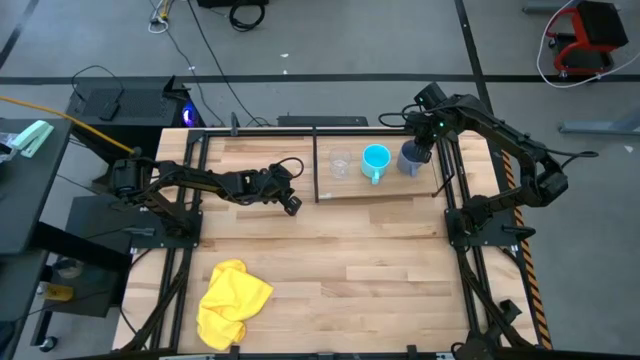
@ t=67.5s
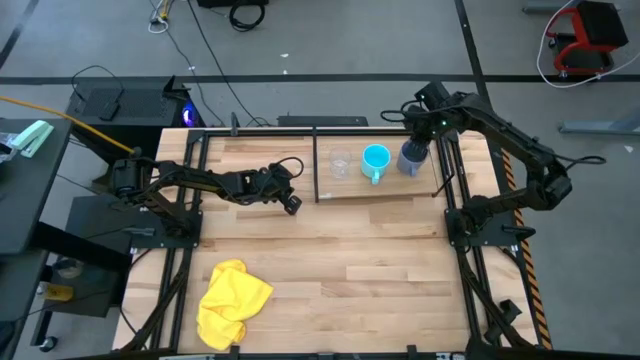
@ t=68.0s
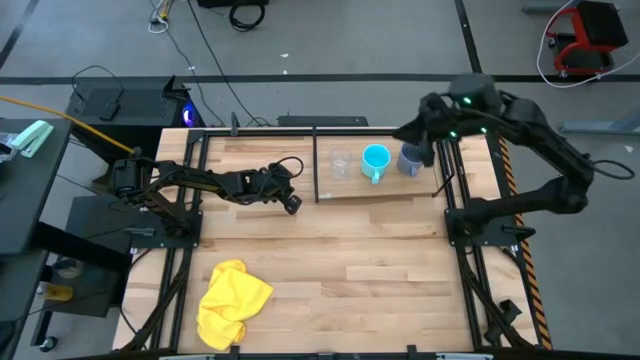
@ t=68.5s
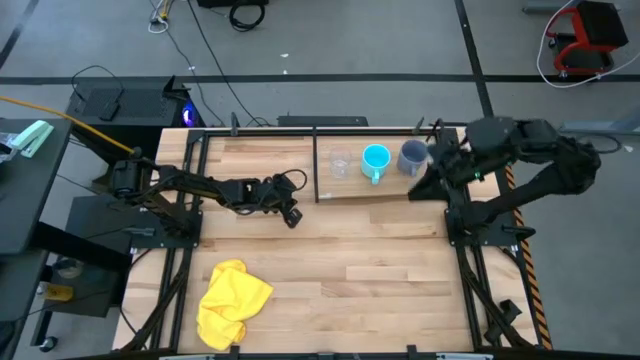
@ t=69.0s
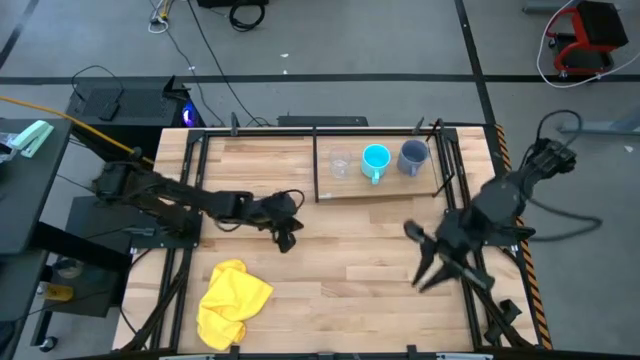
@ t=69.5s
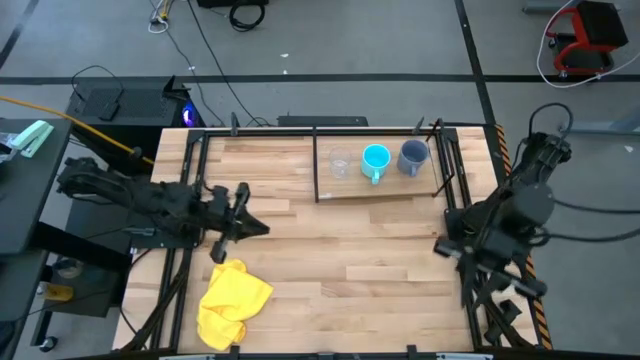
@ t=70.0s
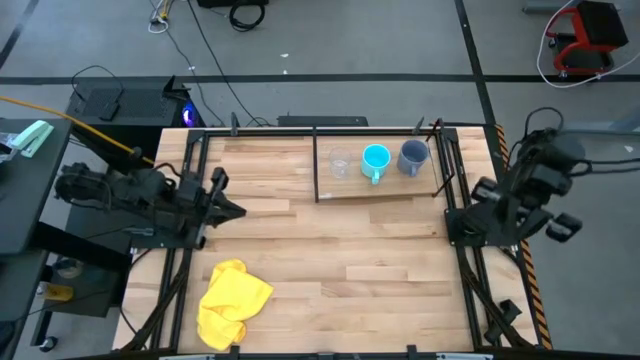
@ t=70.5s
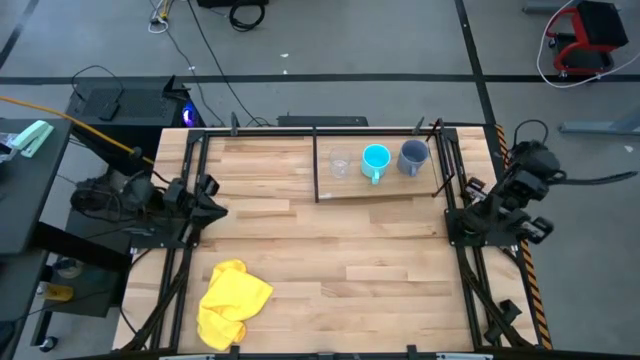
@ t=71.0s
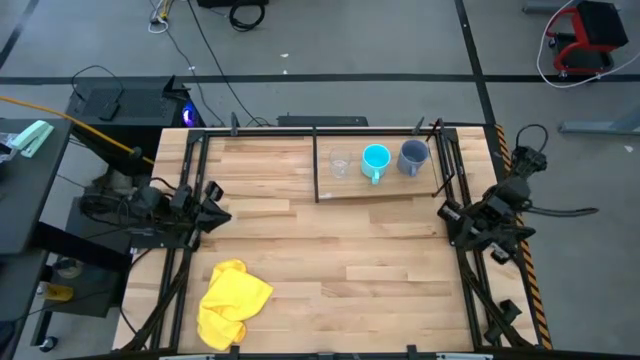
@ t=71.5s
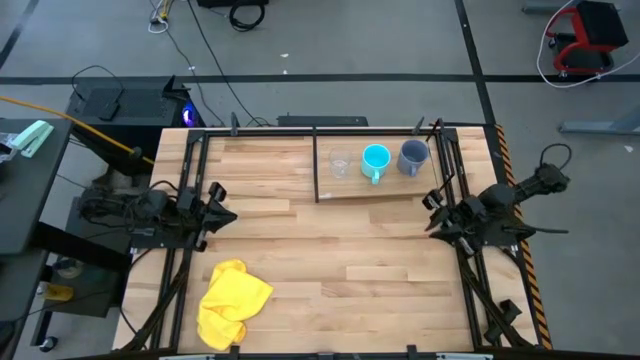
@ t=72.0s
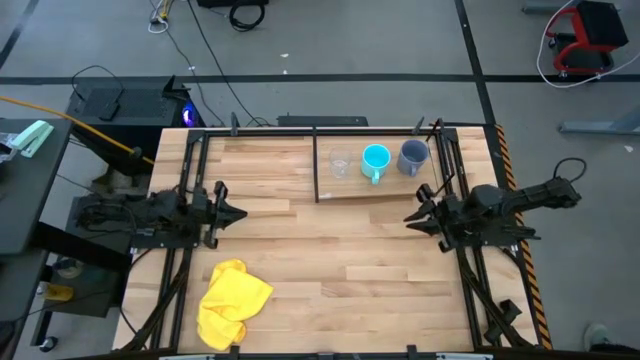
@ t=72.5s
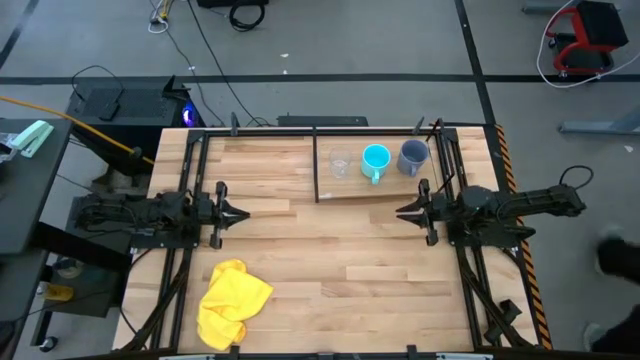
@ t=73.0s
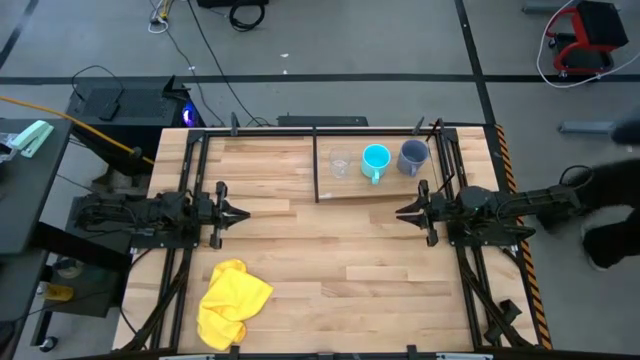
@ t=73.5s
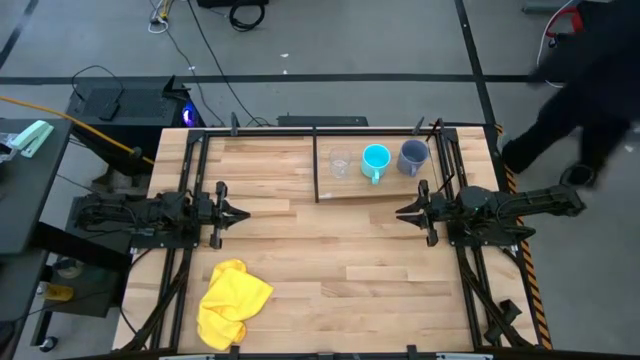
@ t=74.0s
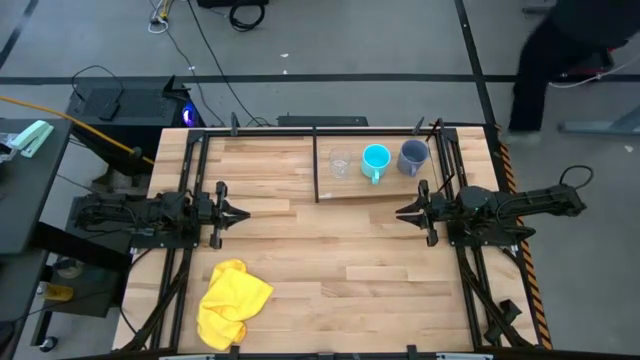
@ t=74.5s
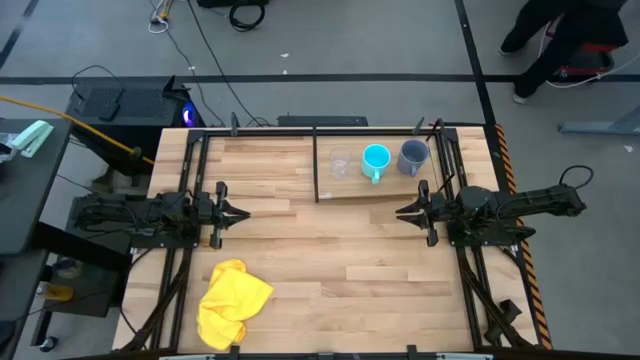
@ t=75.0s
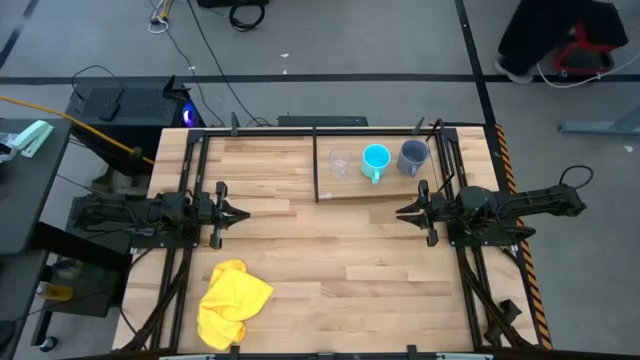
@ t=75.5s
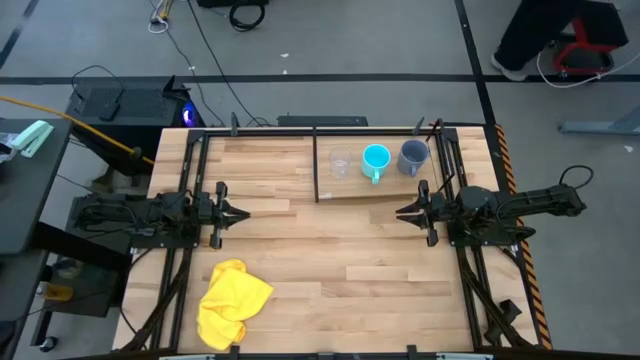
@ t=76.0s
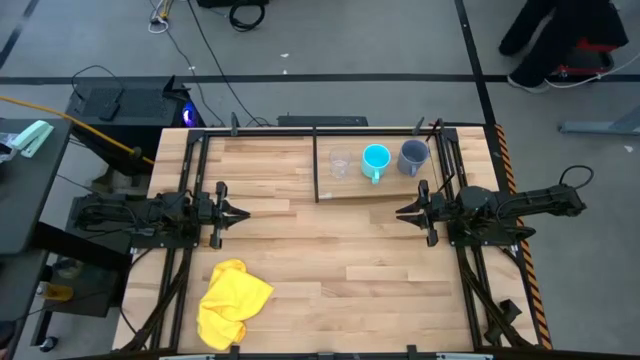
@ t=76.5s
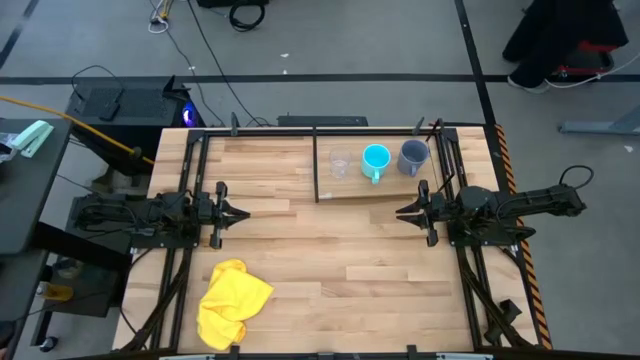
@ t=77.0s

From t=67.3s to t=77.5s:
Task: Stack small to large cups/mugs on shelf
Return to Home Position

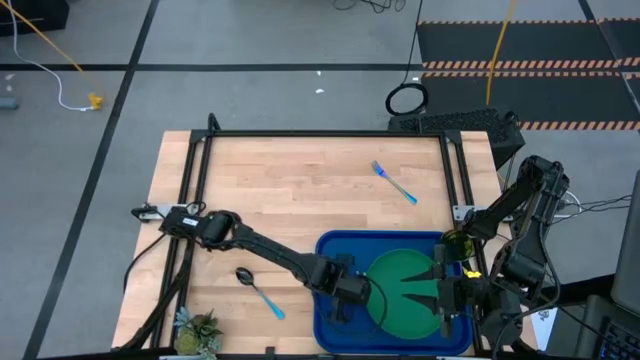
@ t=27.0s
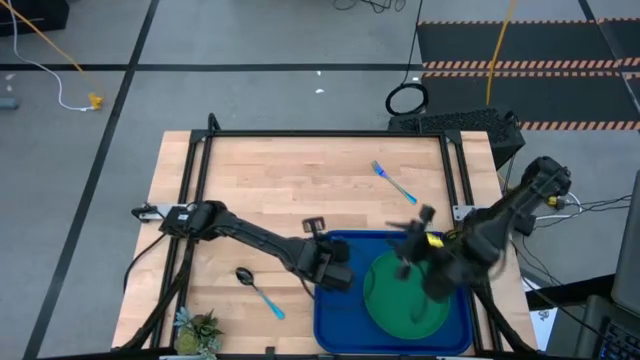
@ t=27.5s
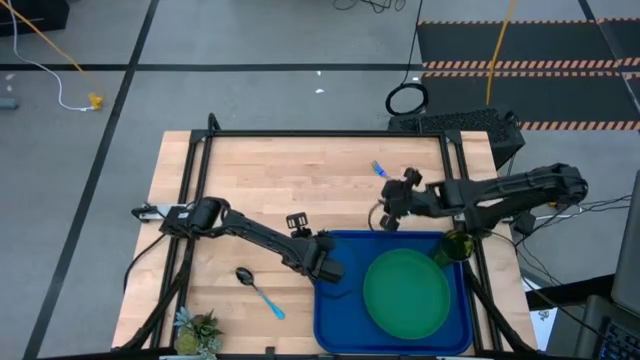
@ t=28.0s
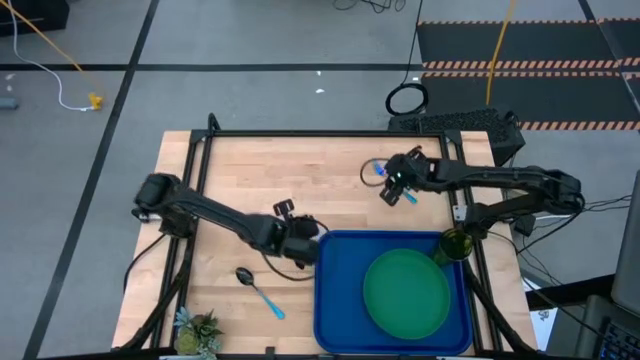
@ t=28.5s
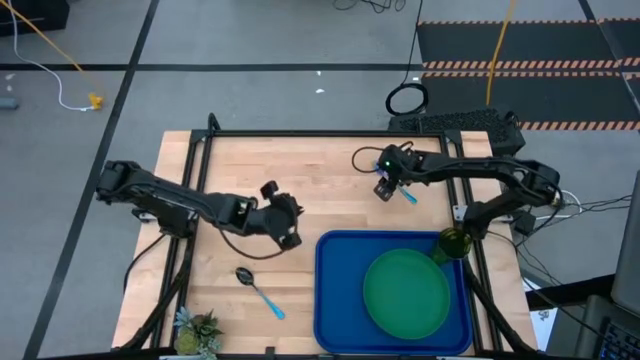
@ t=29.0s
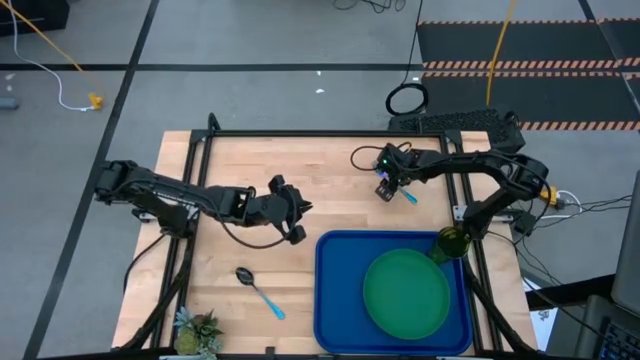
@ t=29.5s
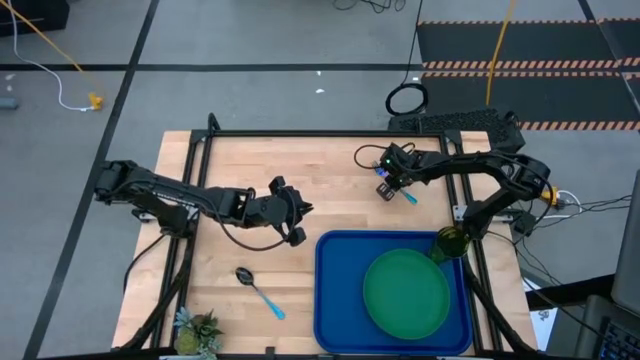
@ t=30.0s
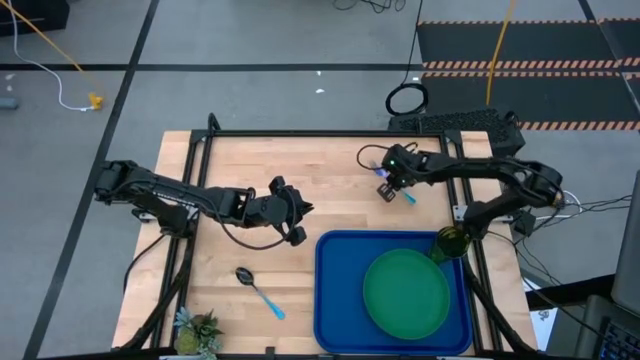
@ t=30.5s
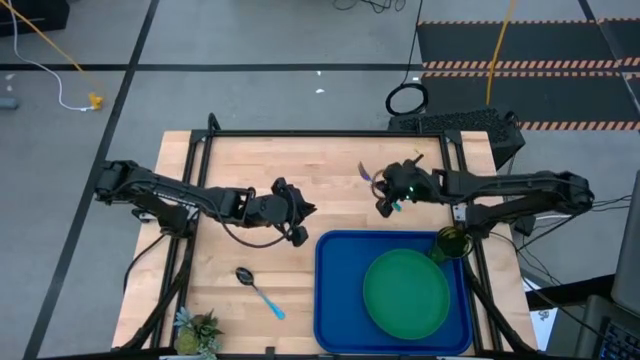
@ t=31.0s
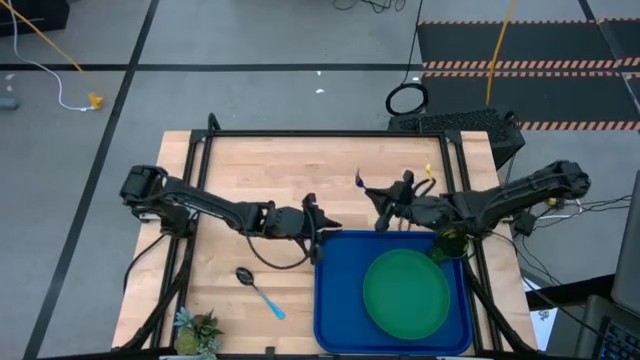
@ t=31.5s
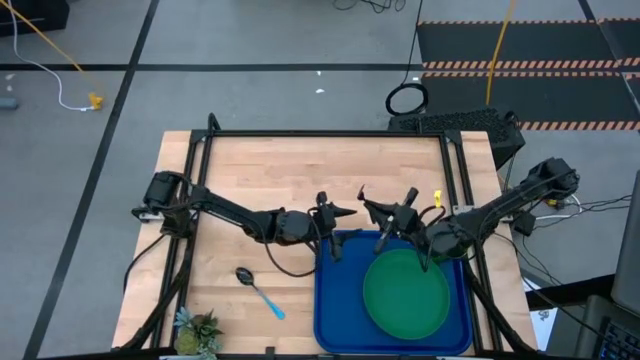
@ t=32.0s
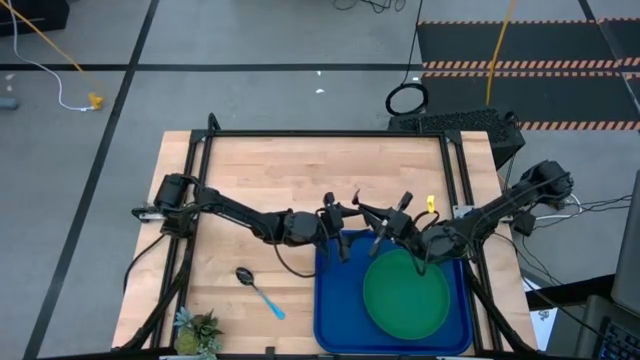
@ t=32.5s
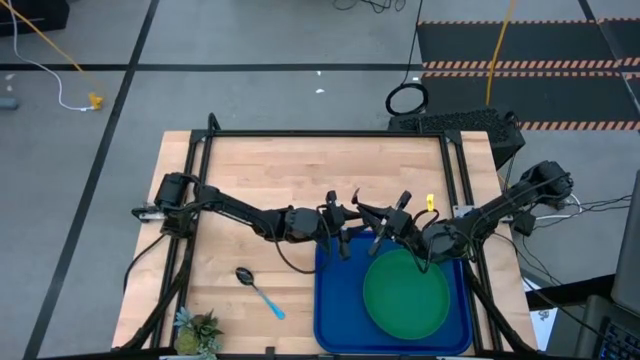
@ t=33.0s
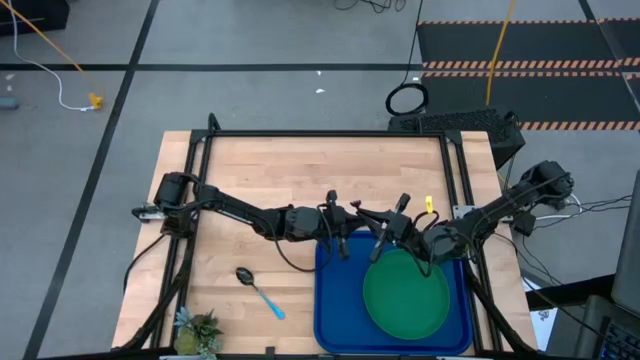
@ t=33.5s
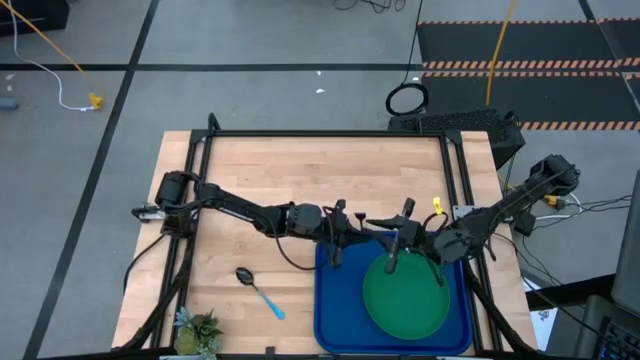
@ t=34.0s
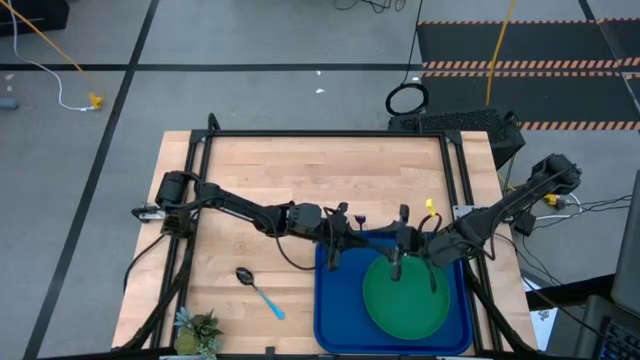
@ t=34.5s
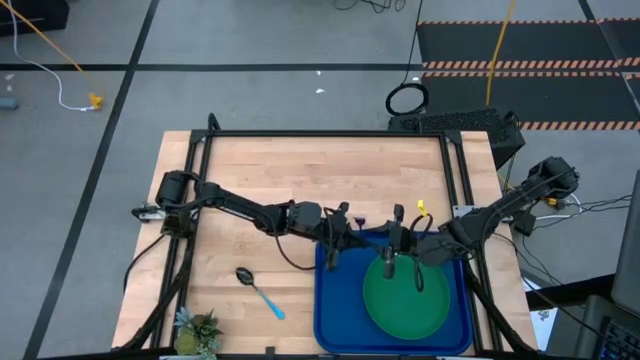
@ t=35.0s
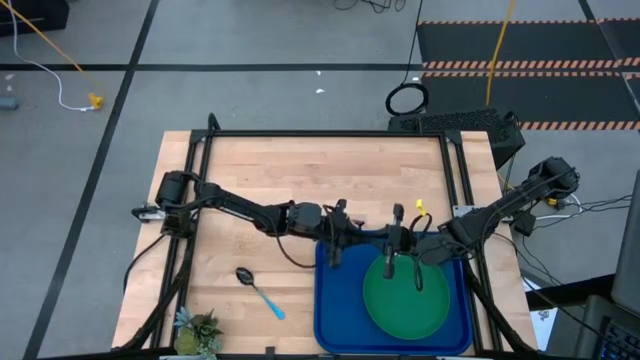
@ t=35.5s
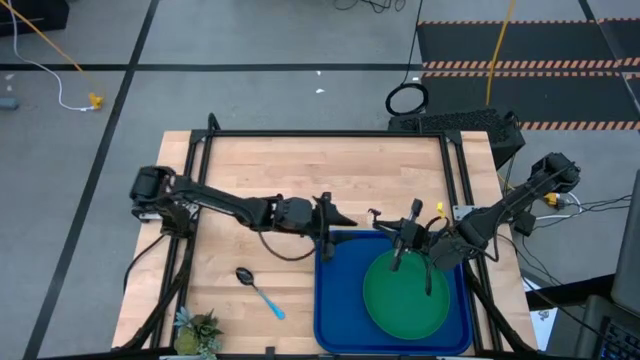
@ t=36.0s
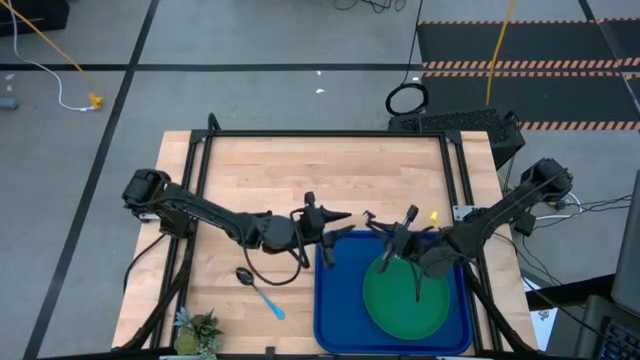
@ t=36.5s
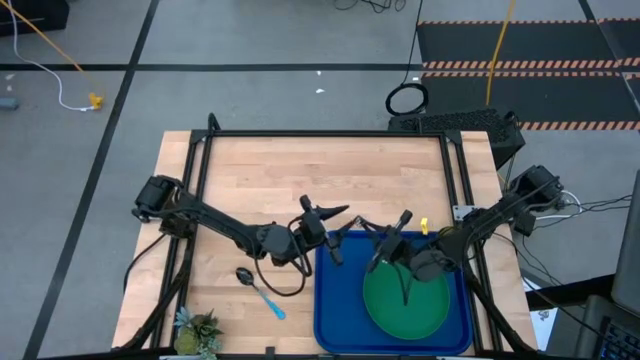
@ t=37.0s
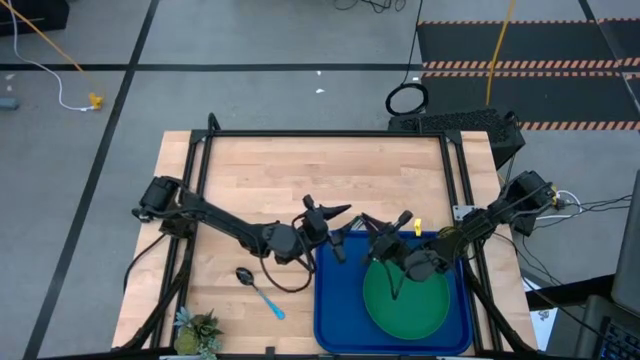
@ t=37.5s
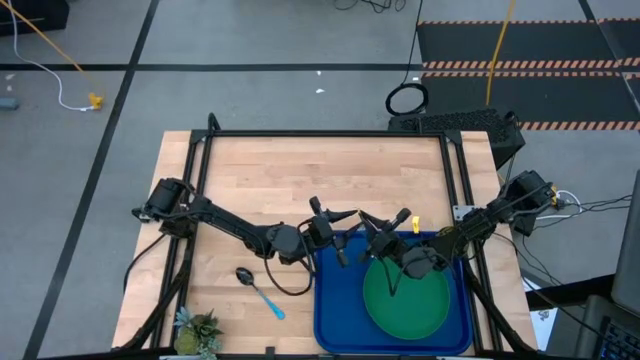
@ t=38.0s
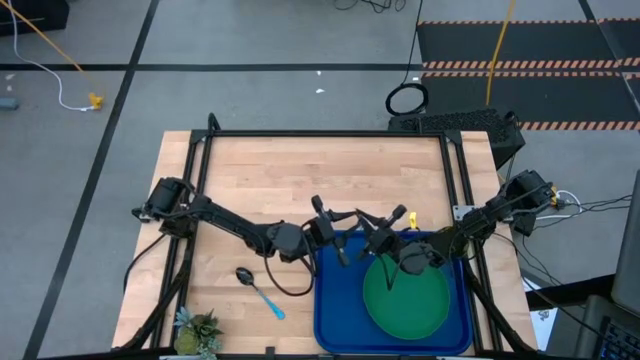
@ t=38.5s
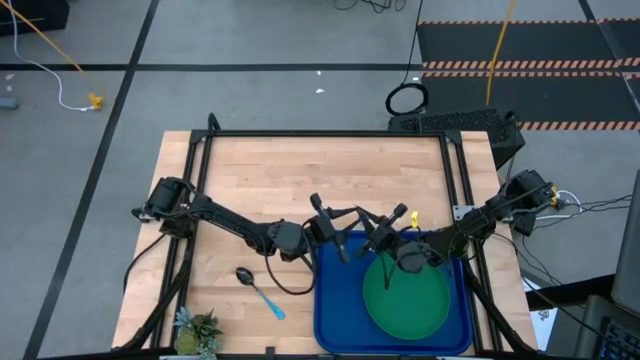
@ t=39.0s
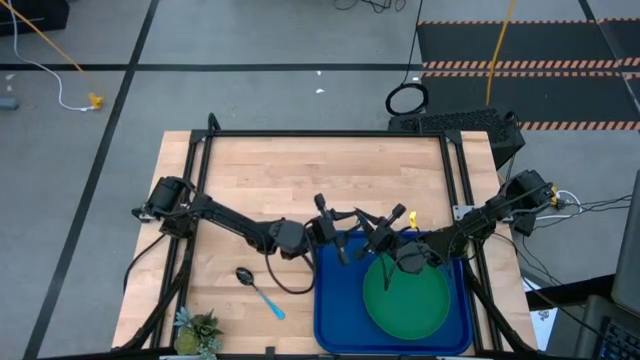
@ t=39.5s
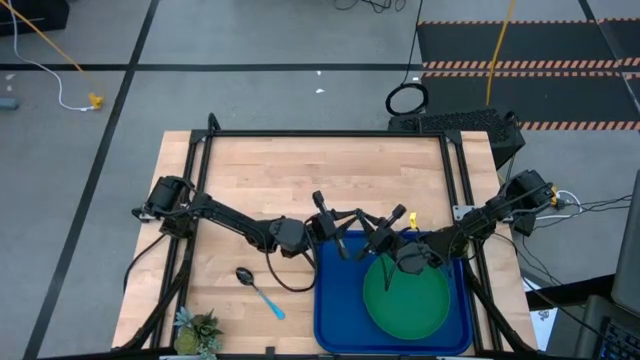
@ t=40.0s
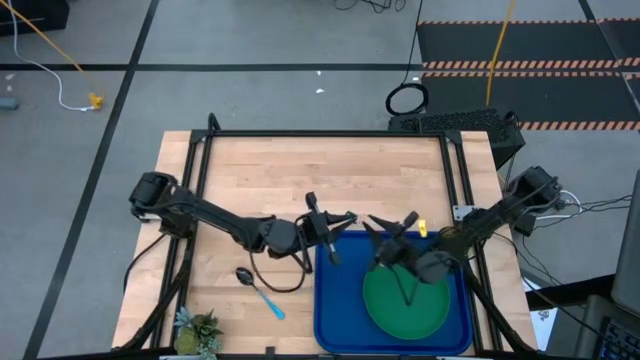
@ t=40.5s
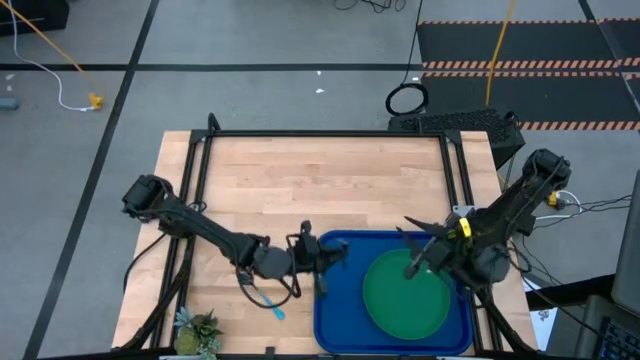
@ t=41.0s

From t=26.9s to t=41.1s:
Task: Pick and place plate/cup/fork/spoon on tray
Put the blue fork on the left side of the plate on the blue tray
